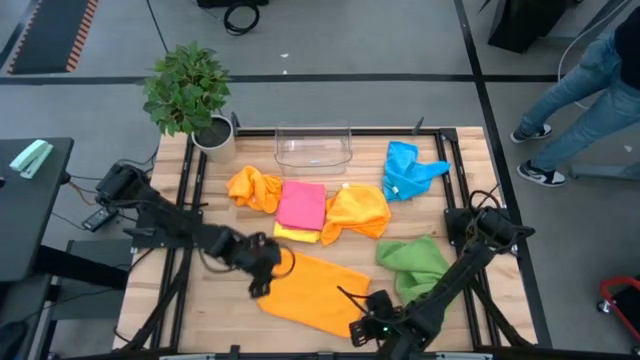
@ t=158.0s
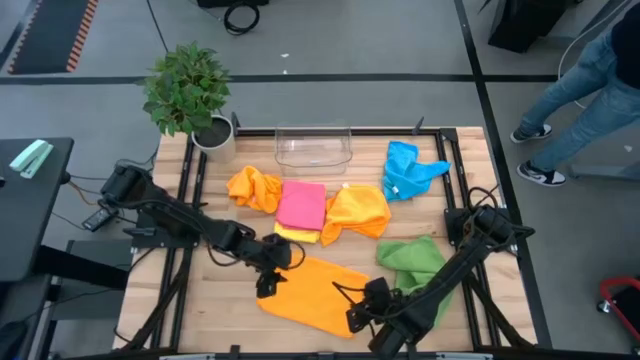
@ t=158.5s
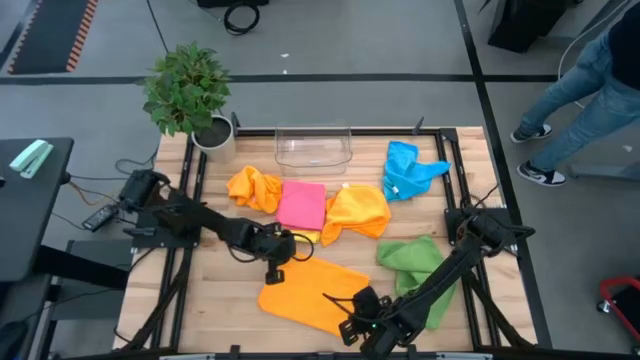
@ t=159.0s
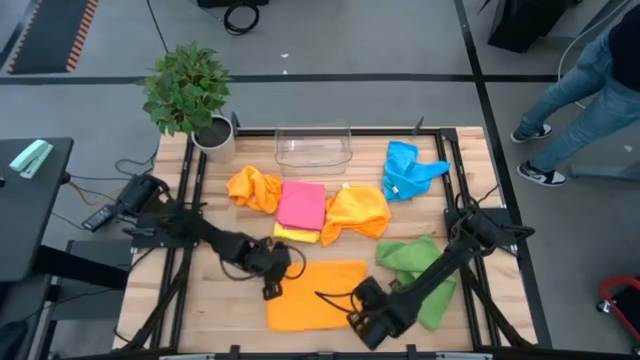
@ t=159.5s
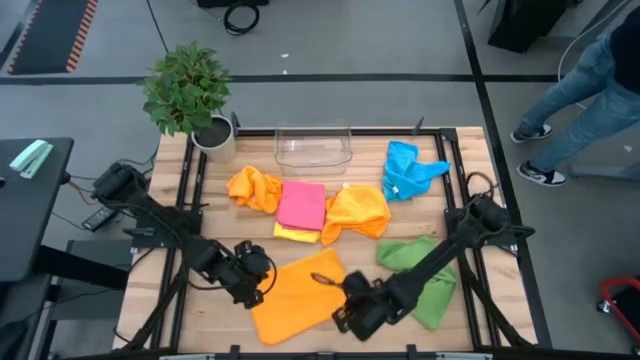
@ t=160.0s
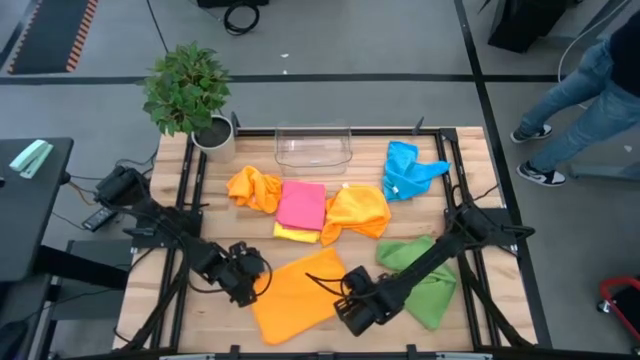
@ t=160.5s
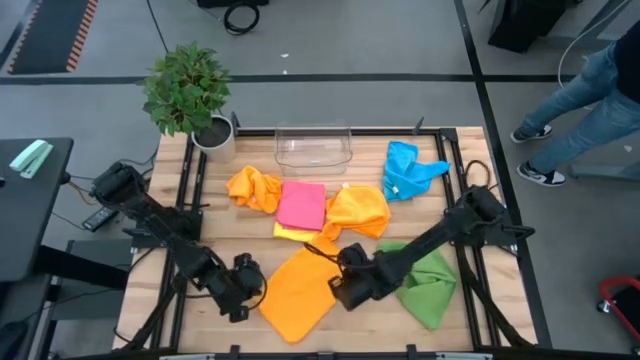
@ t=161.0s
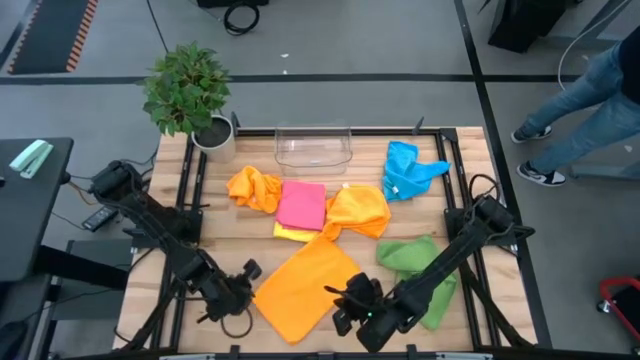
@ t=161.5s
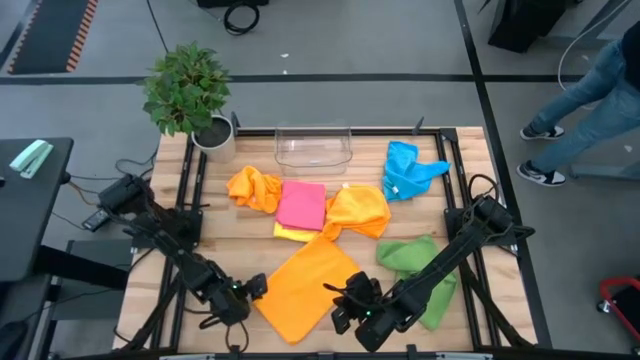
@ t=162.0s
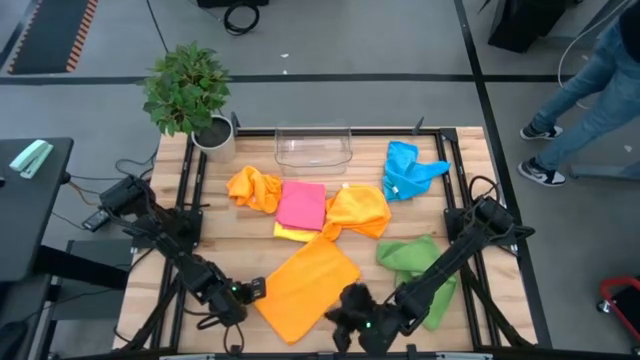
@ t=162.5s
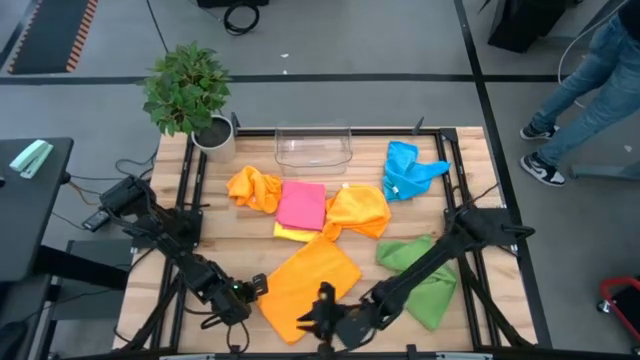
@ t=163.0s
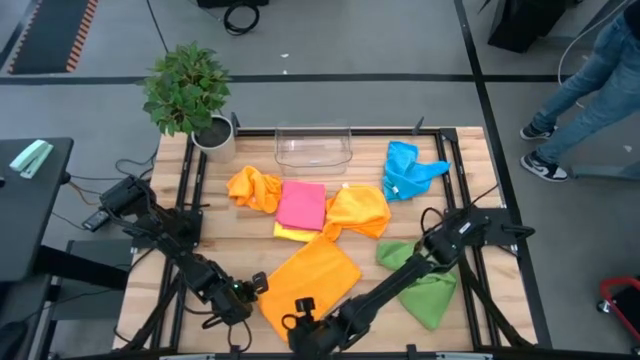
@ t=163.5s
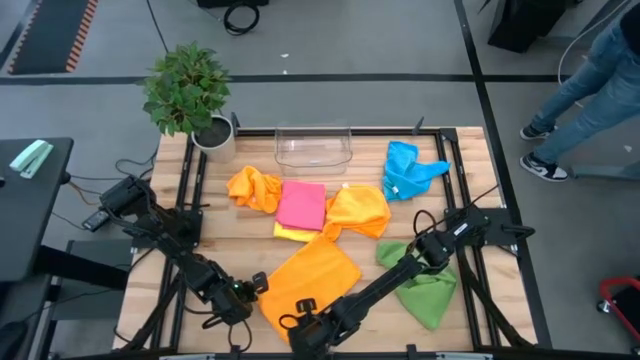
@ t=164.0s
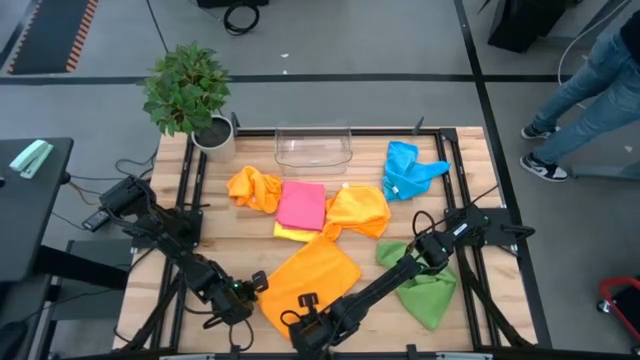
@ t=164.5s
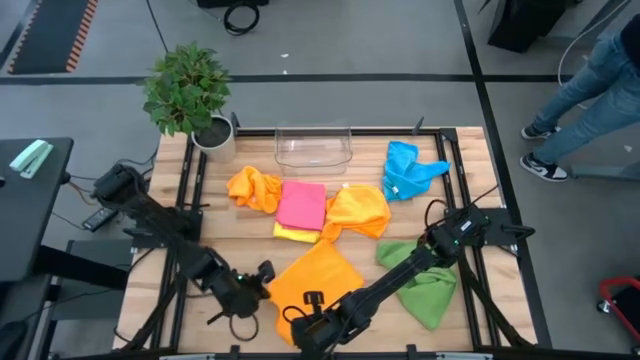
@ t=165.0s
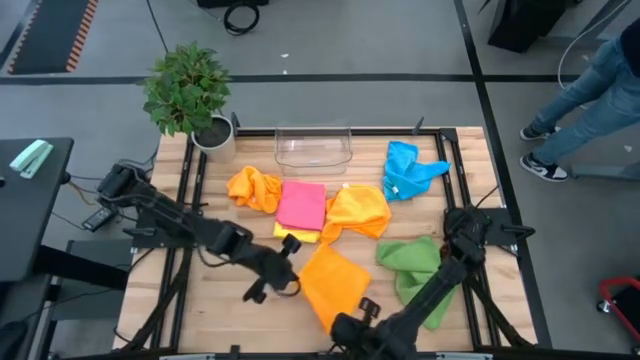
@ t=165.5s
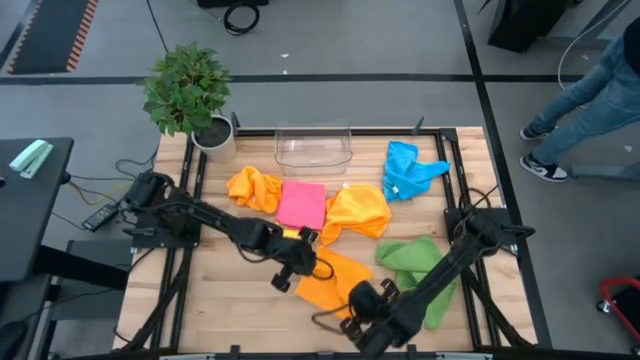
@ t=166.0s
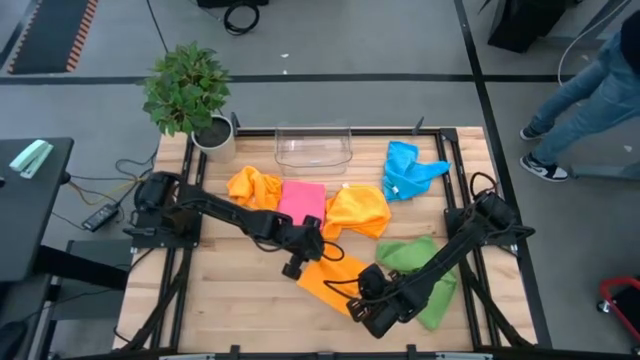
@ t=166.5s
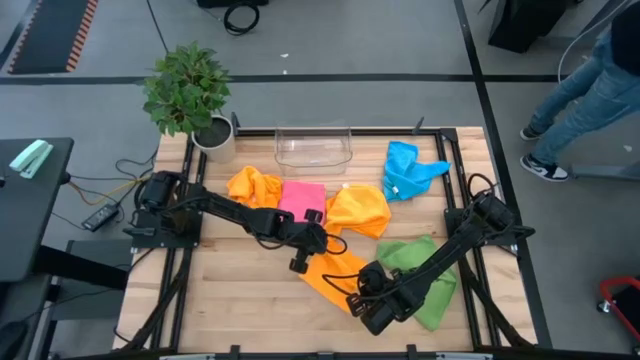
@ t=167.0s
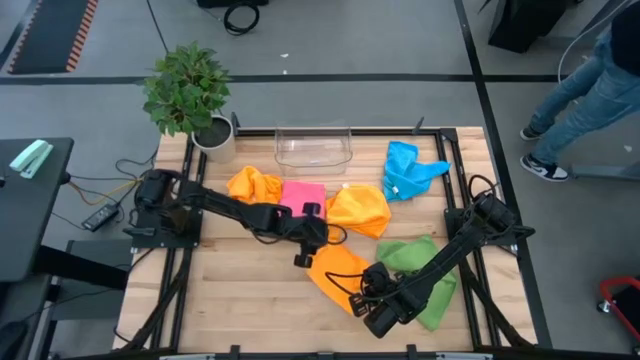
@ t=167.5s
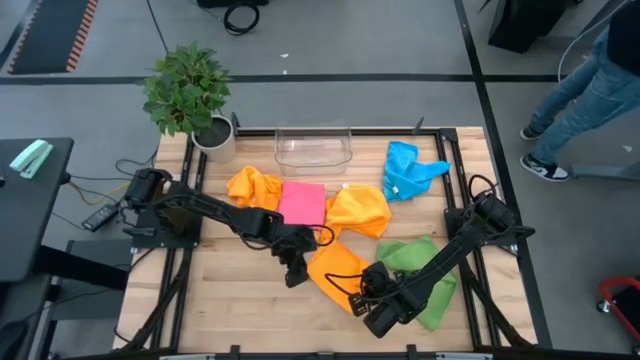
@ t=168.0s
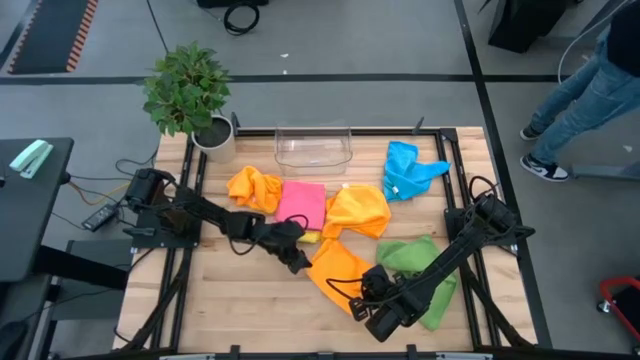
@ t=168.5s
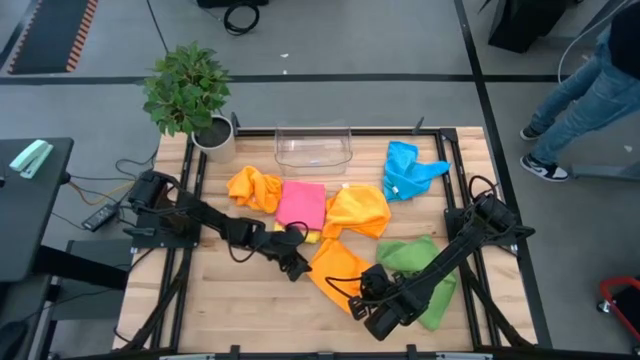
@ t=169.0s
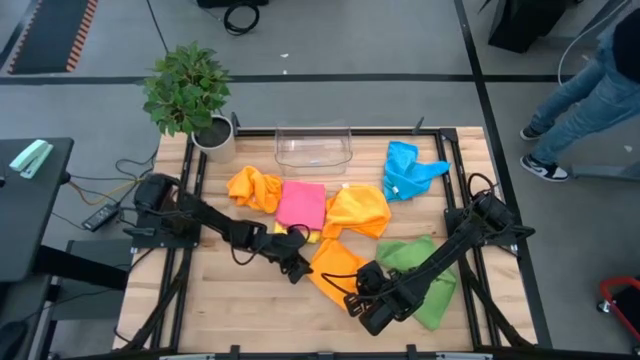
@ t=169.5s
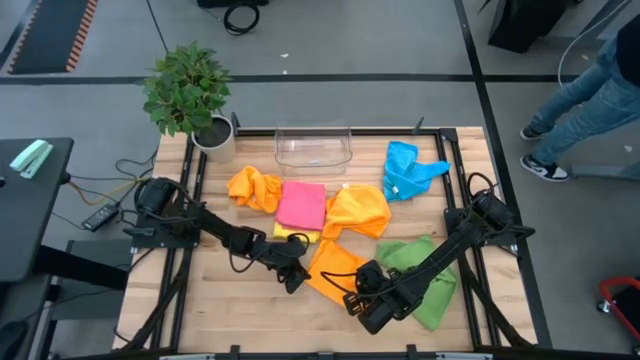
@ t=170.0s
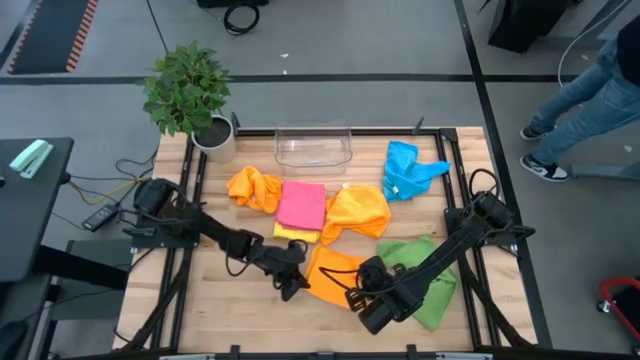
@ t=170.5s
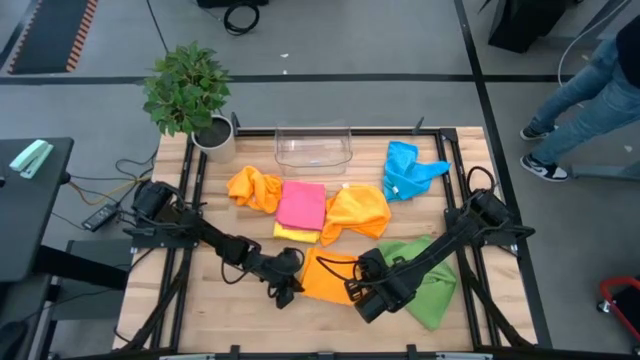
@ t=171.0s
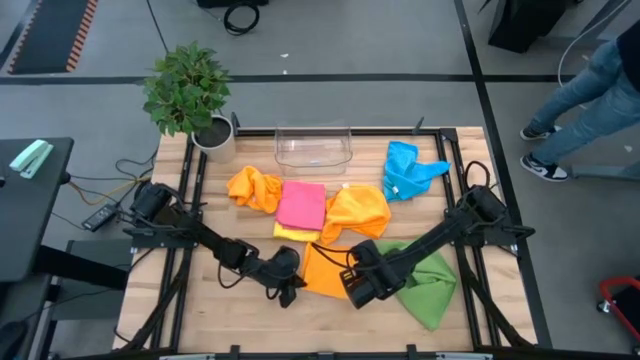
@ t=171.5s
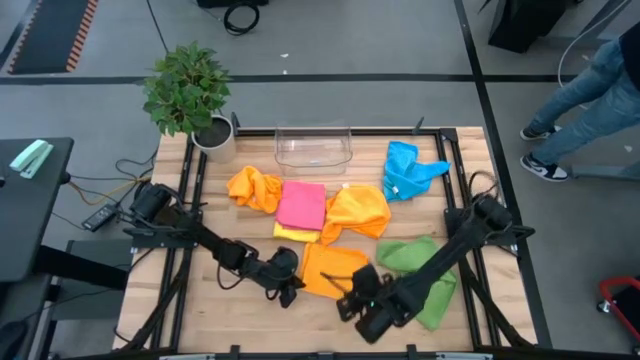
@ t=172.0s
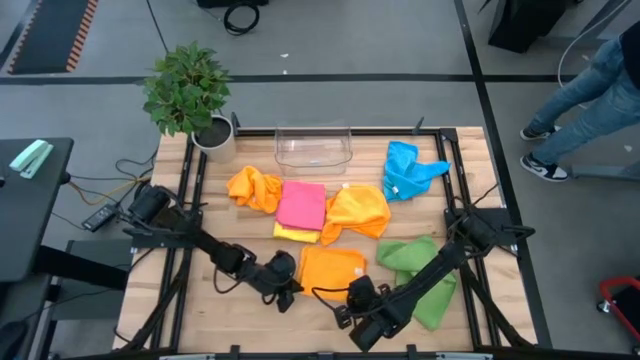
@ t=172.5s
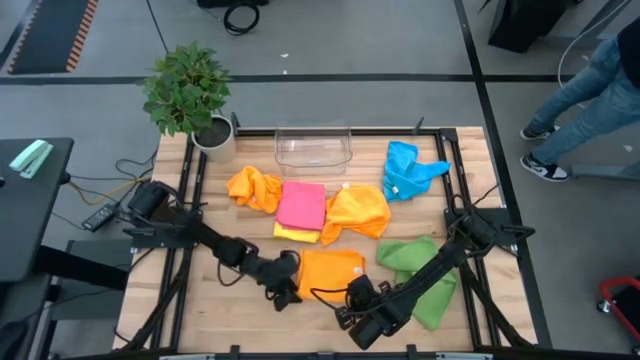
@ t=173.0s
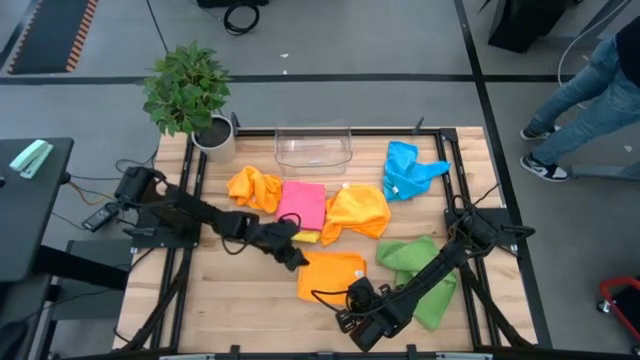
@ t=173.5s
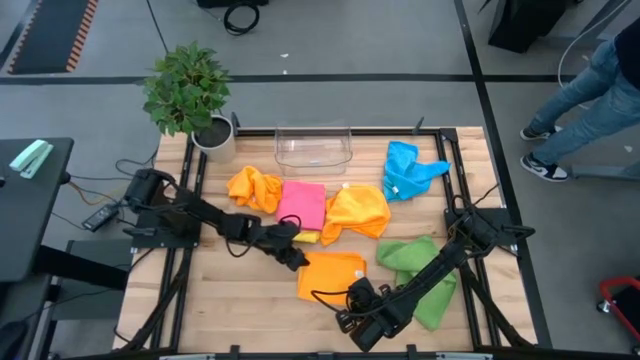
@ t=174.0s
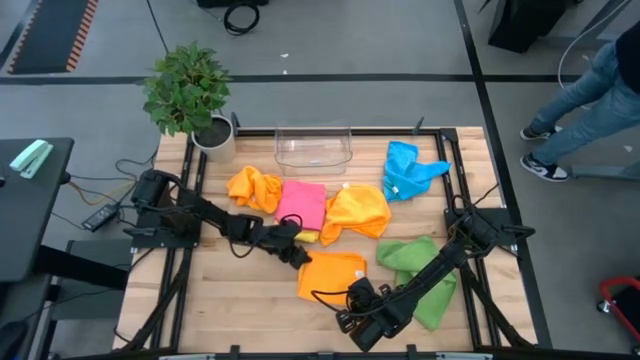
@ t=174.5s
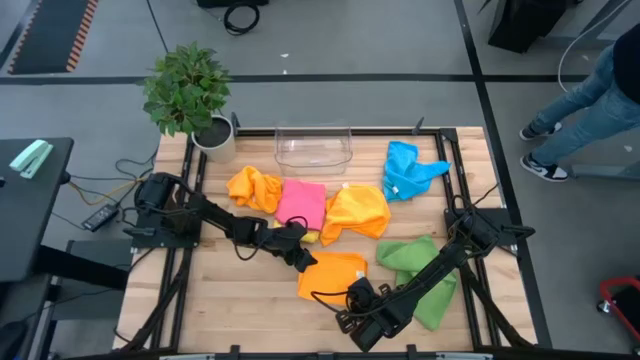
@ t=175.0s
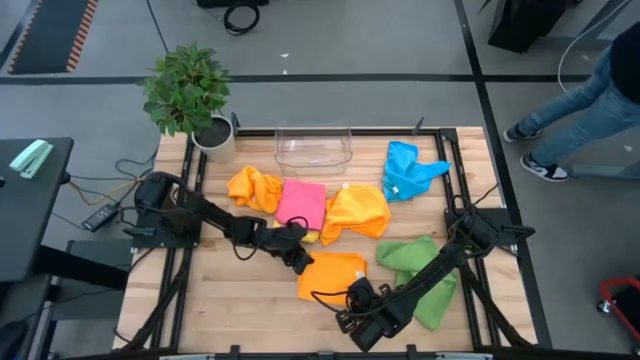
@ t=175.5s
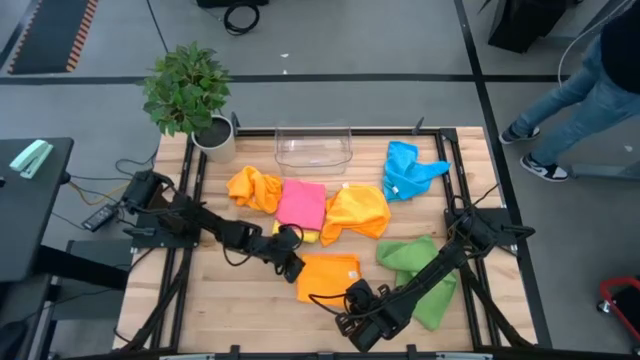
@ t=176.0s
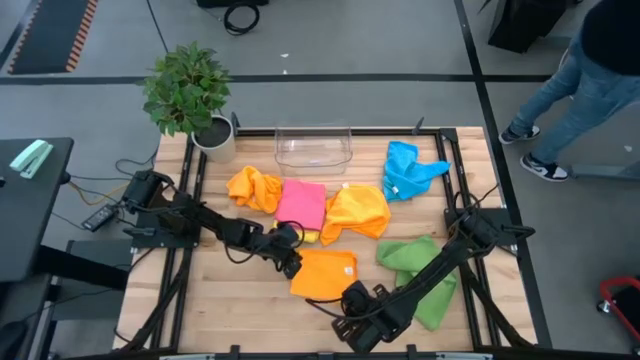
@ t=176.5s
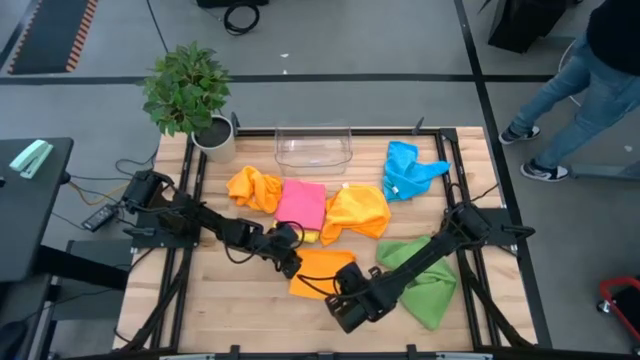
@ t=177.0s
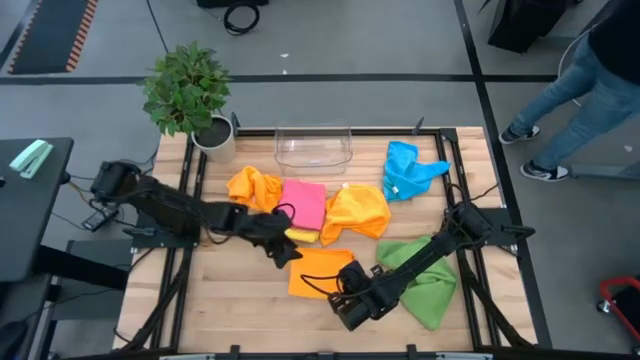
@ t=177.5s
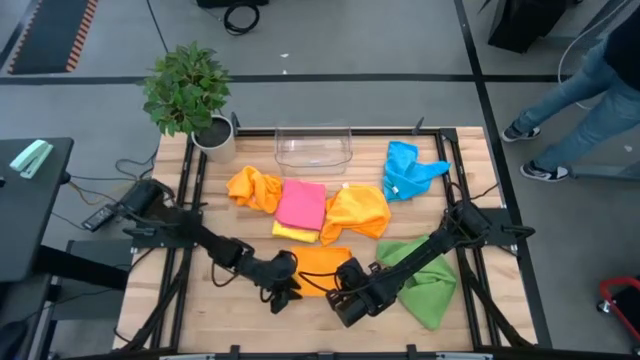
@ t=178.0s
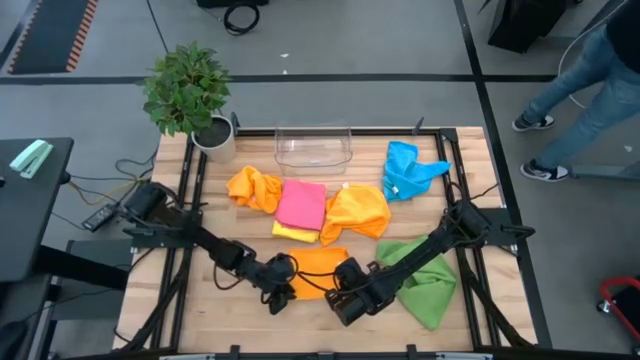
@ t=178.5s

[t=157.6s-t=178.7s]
Task: Fold microfiber towels
Fold the bottom orange microfiber cloth
